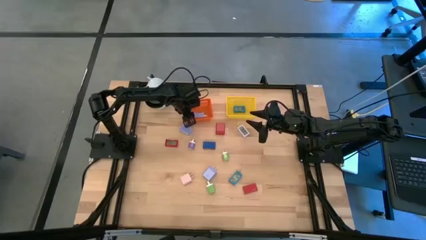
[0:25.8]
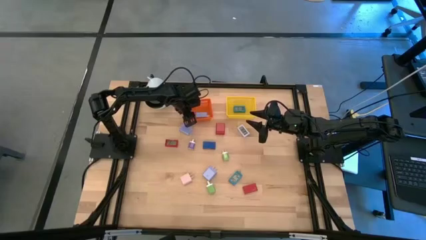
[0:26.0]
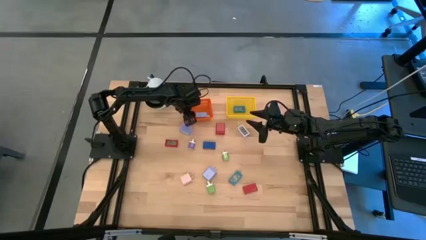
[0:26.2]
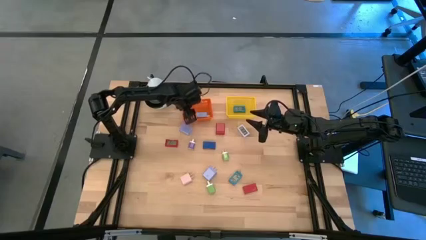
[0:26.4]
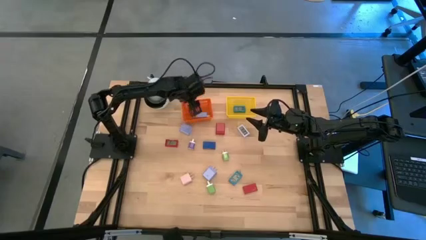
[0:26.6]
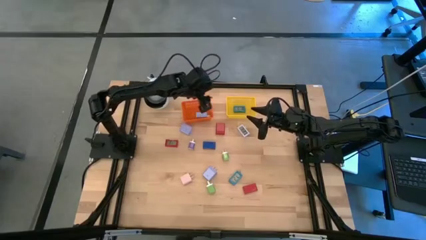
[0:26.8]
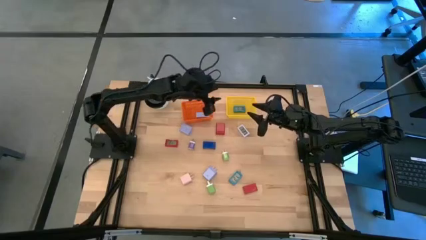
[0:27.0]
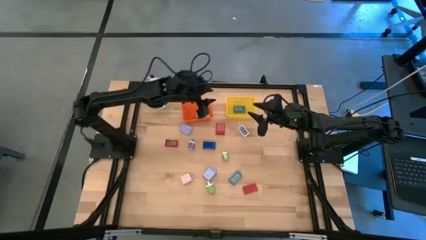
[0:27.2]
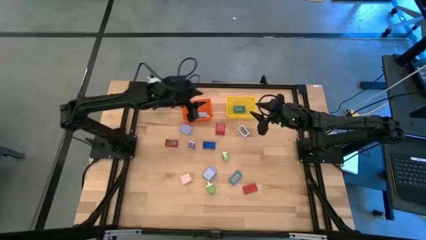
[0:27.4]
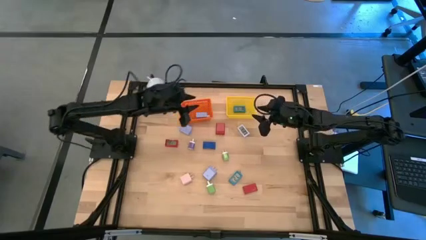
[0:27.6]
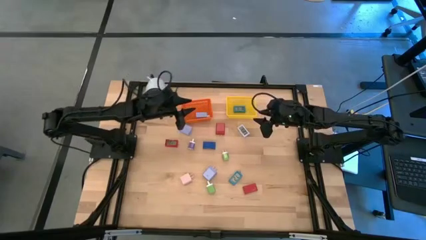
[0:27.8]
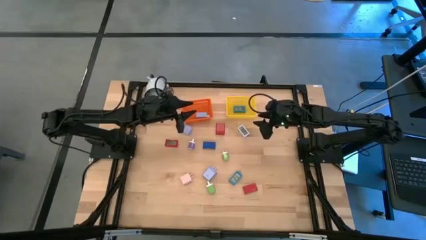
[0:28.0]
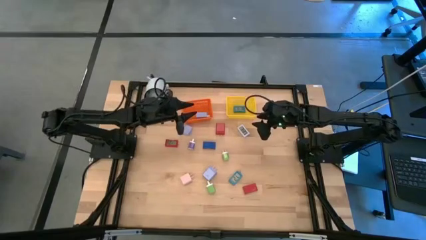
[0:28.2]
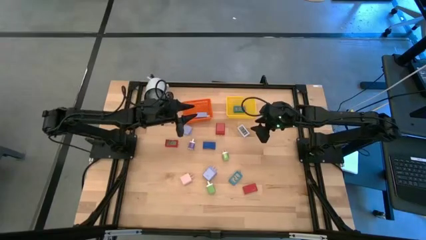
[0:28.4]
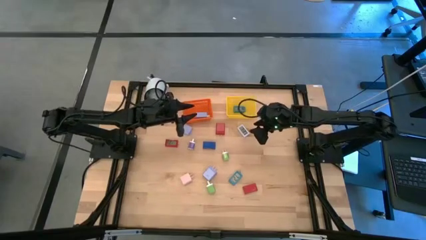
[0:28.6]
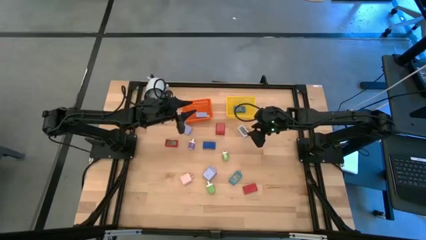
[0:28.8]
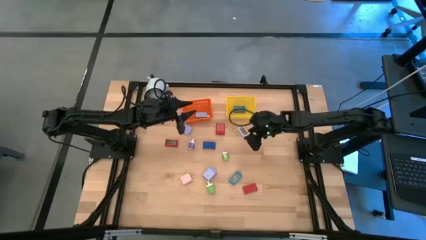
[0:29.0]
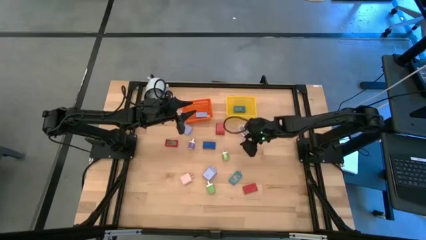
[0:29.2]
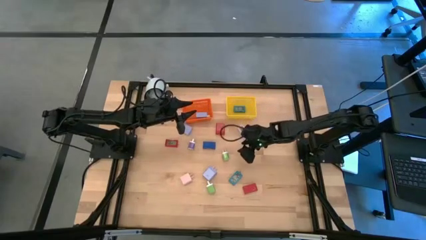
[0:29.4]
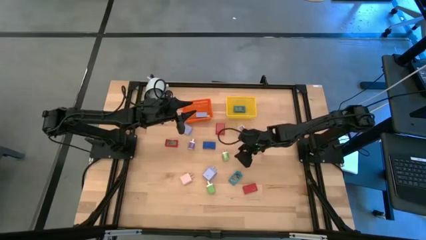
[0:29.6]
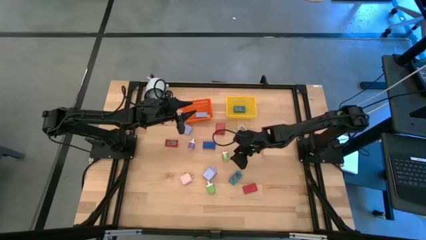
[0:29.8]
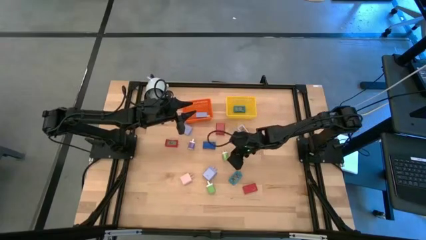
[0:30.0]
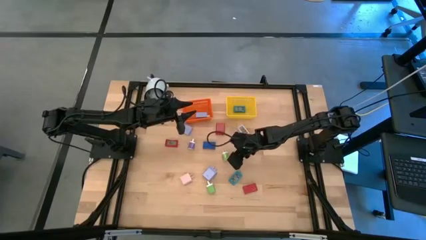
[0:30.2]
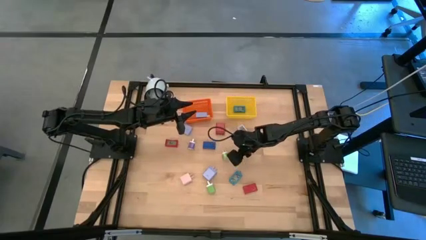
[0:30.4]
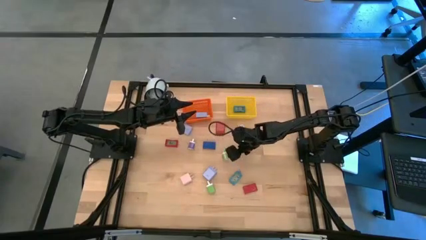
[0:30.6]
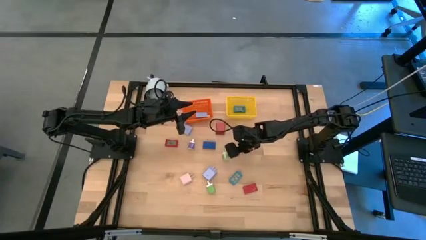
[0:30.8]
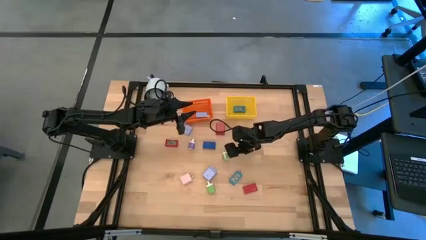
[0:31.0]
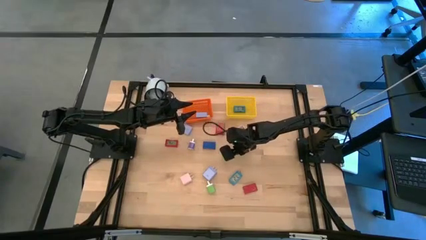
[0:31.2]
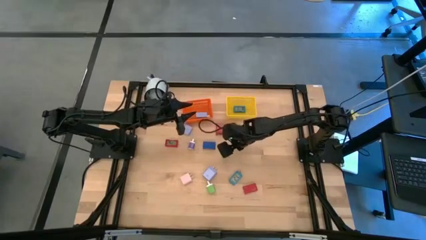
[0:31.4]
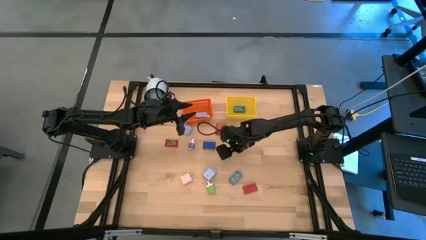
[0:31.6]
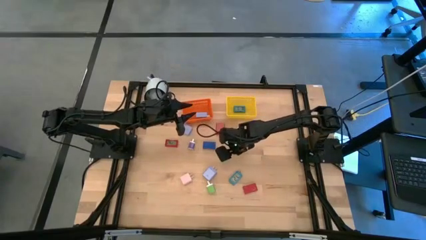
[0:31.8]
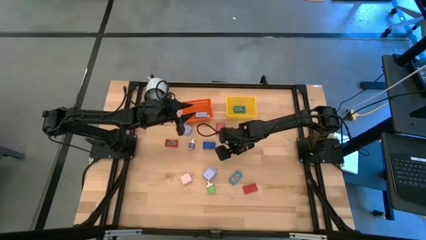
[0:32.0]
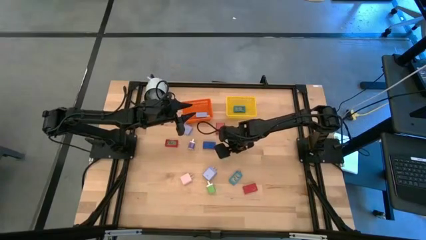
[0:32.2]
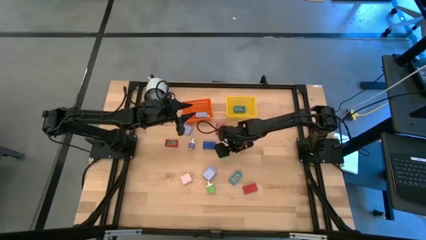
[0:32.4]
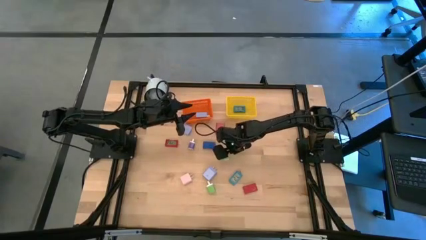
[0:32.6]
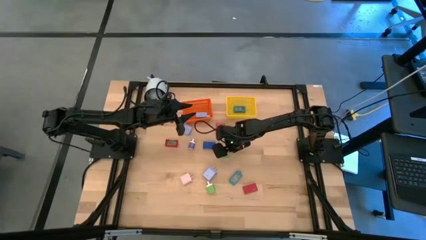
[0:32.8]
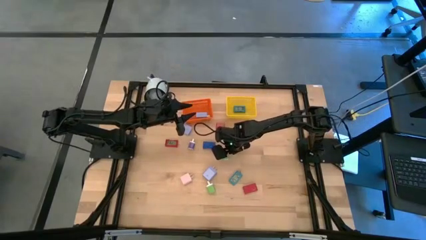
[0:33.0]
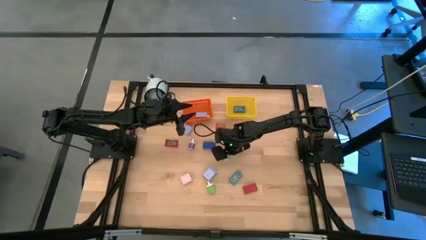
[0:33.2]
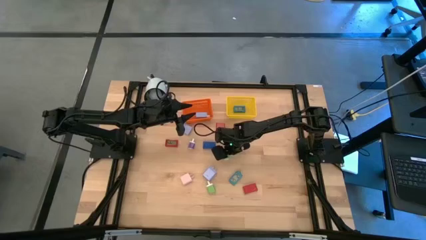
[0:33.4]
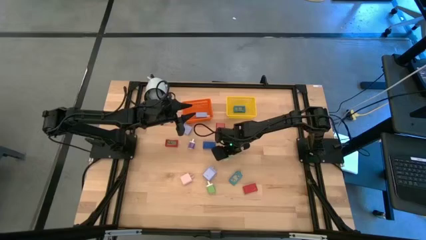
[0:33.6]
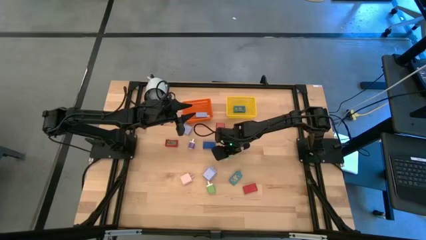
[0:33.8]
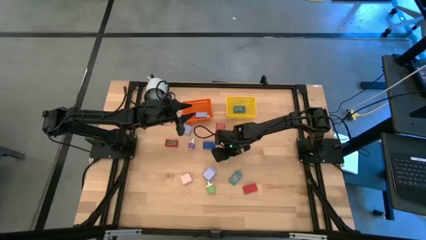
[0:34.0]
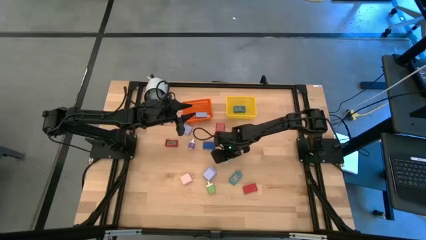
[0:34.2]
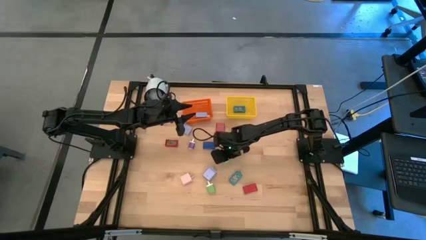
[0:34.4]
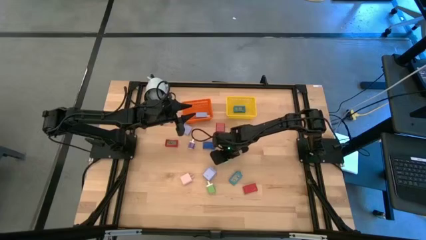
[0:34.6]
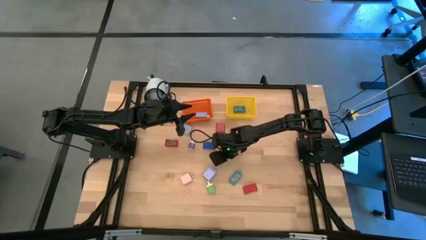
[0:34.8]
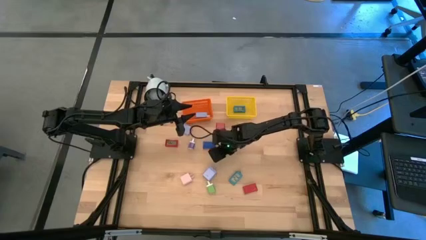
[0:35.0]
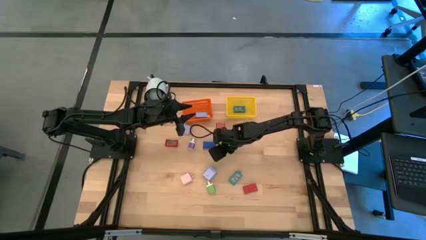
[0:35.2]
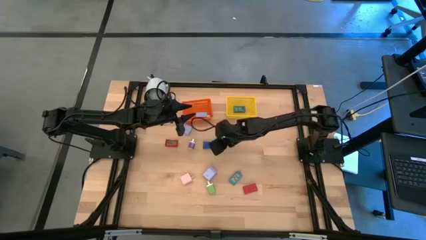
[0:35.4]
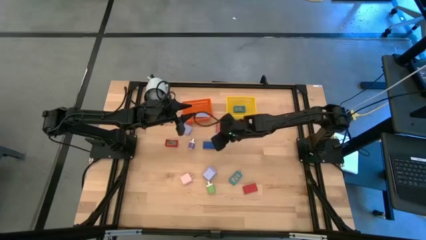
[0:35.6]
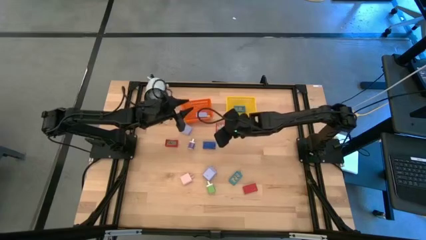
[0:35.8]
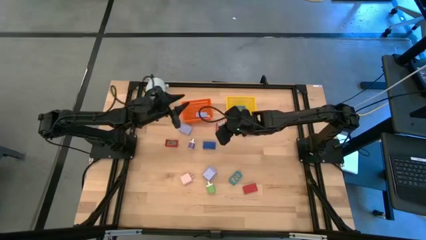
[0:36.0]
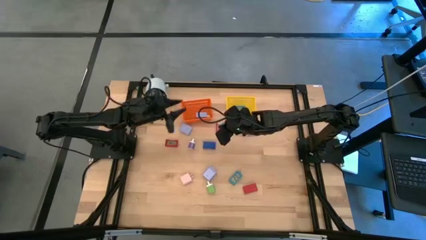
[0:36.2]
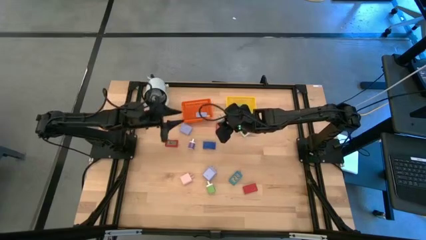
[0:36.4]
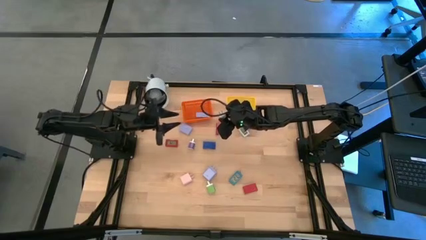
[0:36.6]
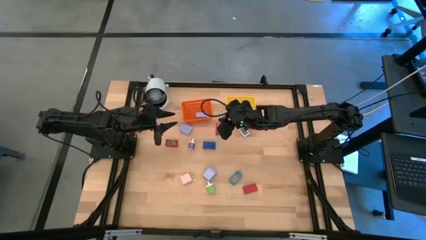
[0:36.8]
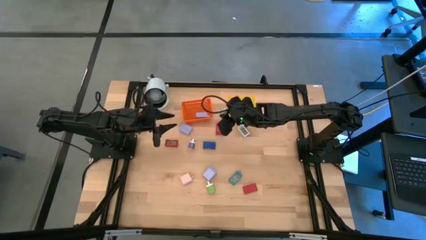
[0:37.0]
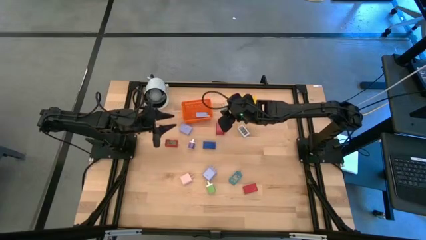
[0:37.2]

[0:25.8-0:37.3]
Task: Pick & Place Office items
Put the top green charger adapter into the orange bin

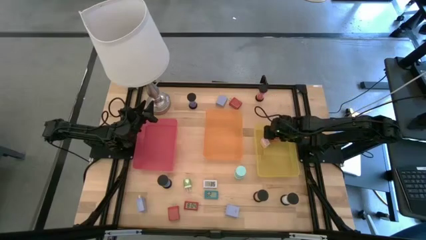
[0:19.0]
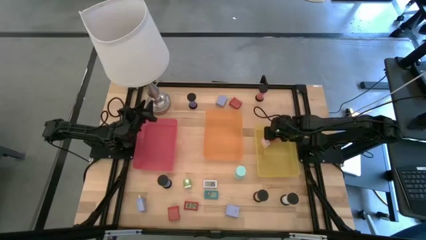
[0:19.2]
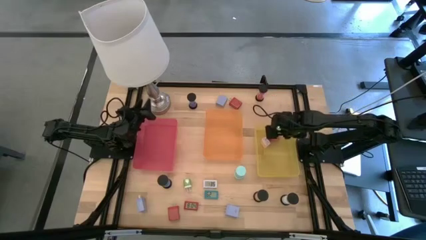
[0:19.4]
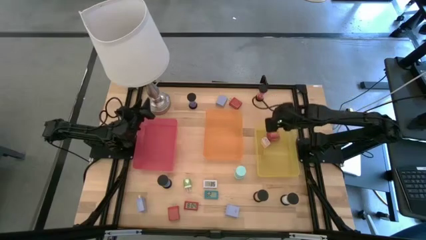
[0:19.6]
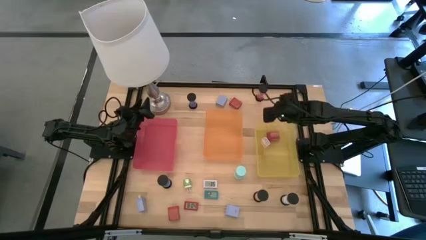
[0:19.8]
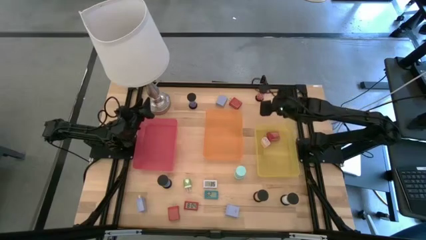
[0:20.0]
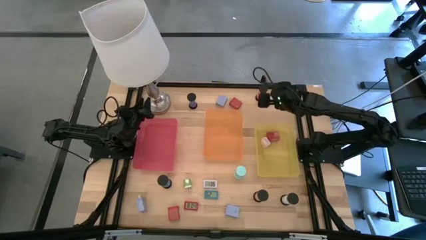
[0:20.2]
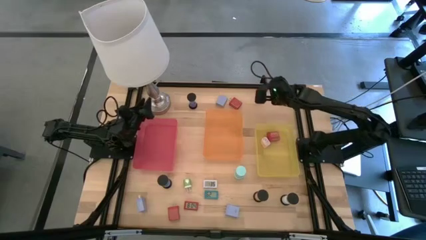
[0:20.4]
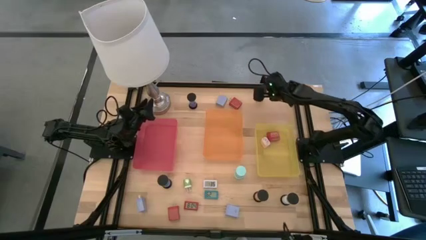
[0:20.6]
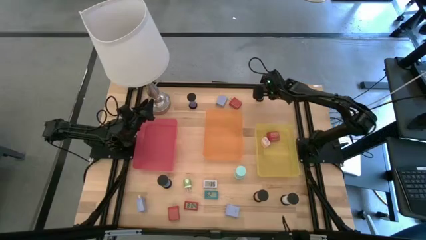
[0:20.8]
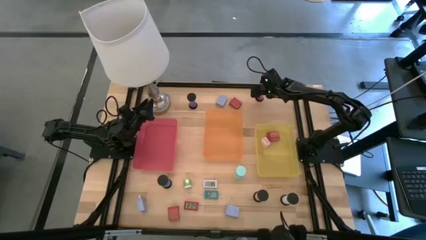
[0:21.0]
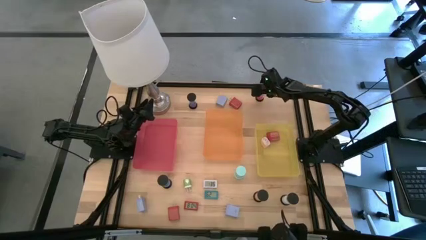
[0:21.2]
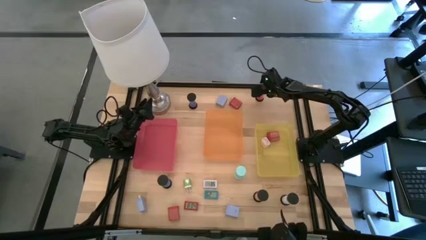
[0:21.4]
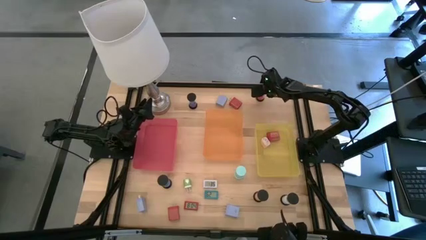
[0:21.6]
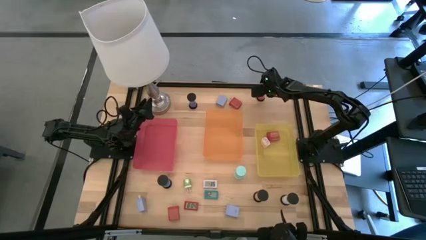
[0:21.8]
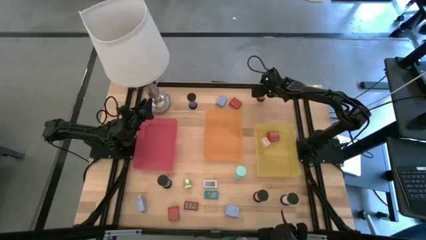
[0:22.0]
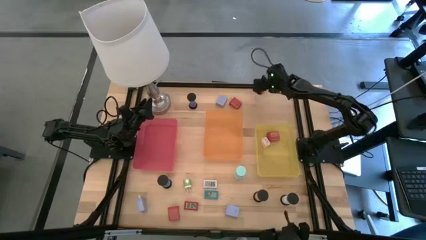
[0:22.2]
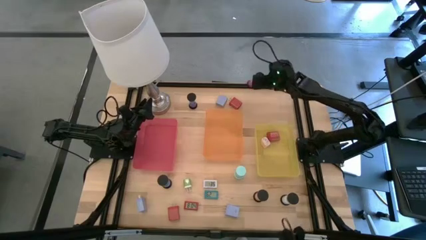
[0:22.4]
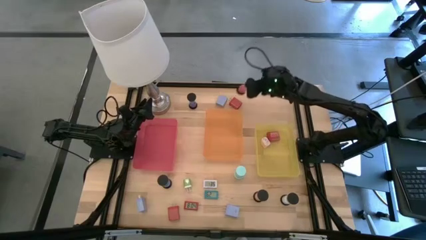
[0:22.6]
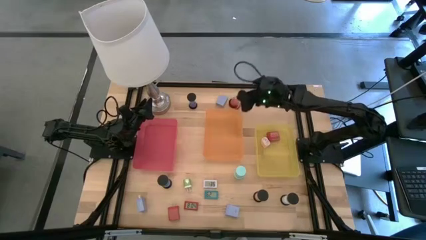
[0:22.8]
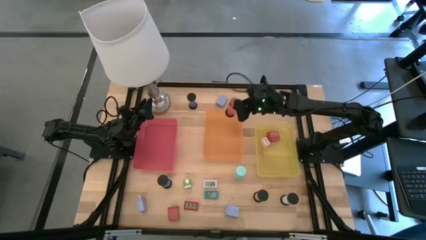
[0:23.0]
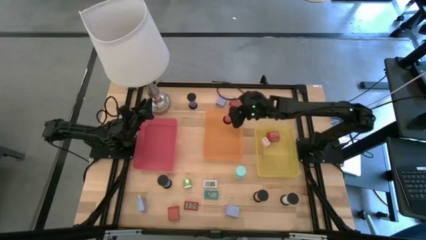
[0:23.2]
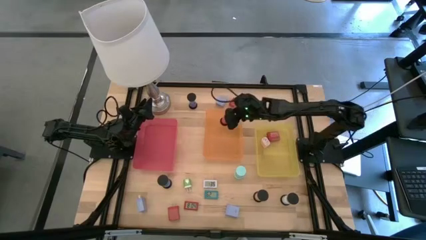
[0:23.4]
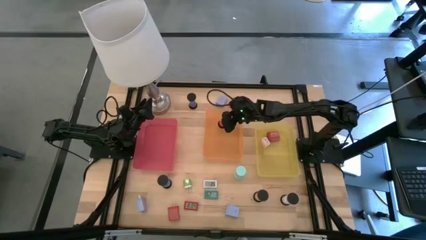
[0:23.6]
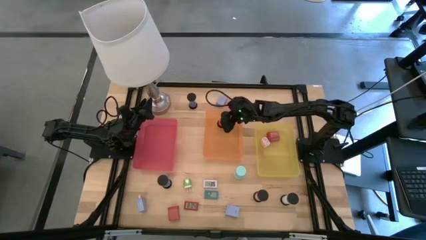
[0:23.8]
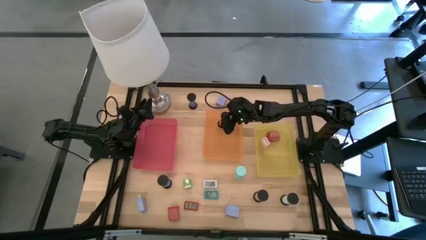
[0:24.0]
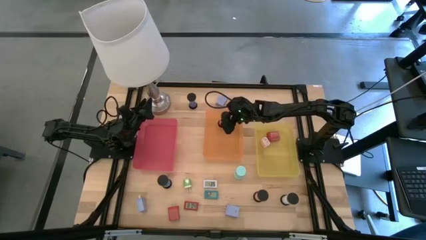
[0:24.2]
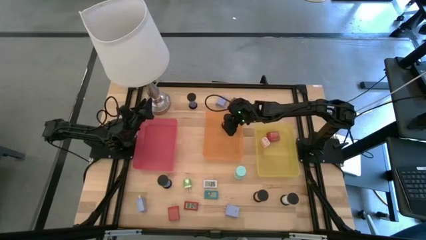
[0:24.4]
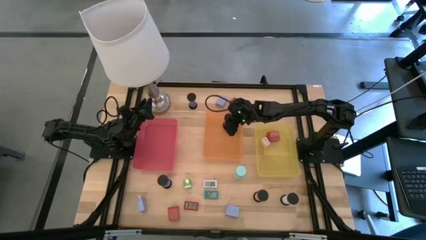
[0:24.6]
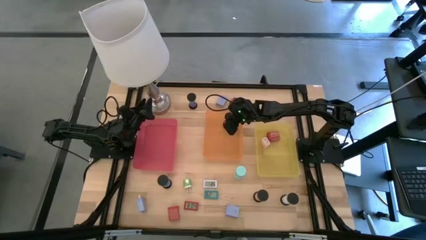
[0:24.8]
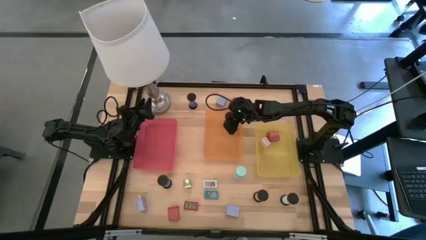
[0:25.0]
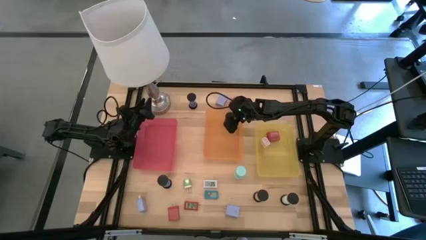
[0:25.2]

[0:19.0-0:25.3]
Task: Pick & Place Office items
Put the red hourglass into the orange bin
